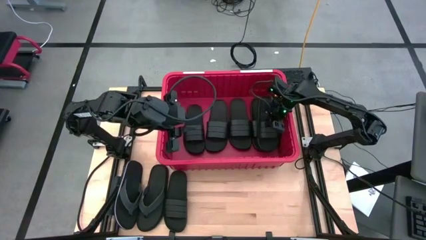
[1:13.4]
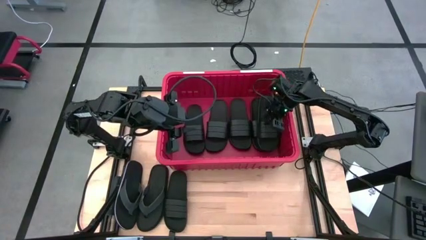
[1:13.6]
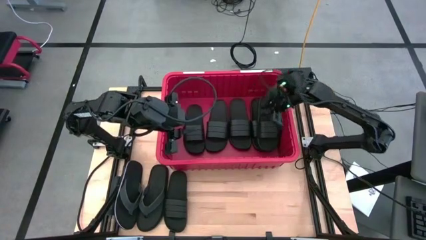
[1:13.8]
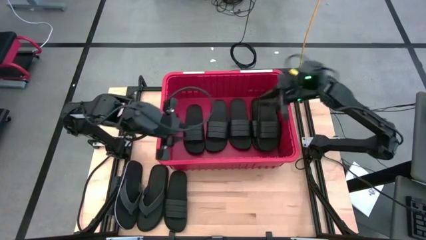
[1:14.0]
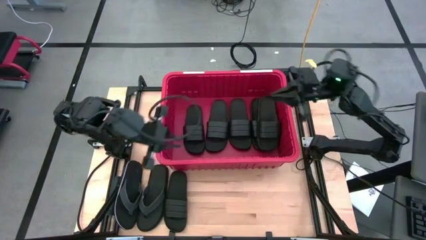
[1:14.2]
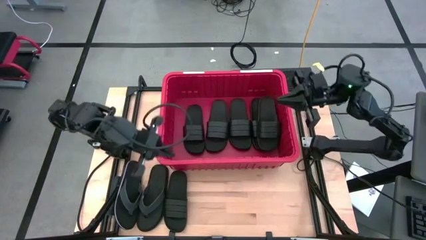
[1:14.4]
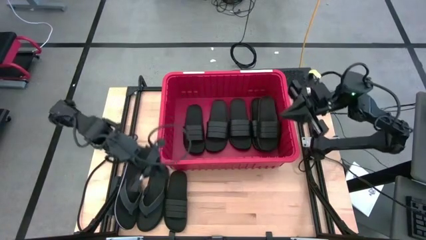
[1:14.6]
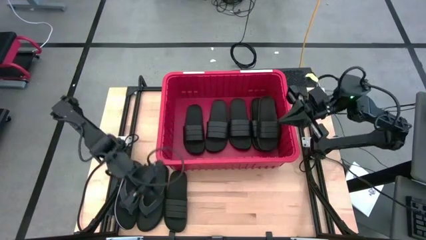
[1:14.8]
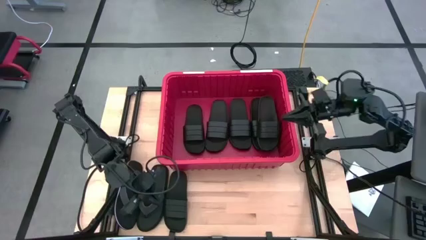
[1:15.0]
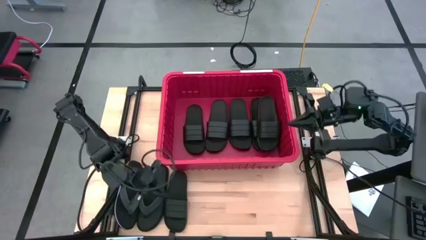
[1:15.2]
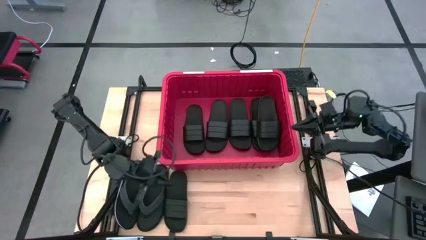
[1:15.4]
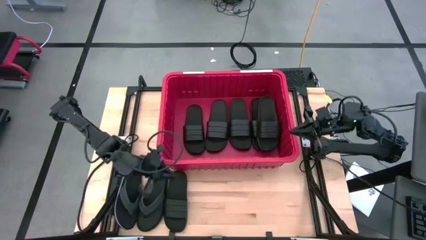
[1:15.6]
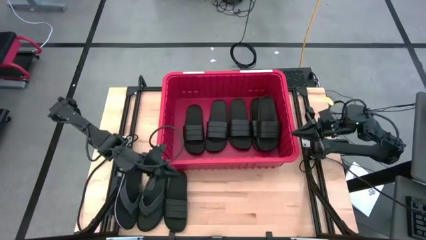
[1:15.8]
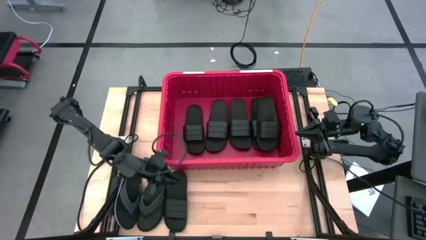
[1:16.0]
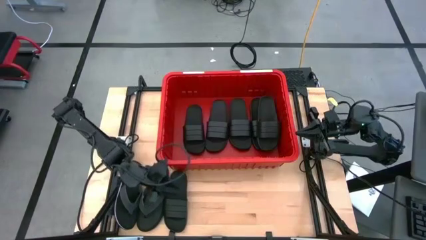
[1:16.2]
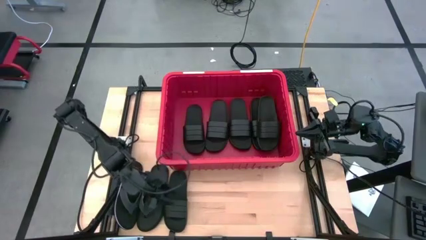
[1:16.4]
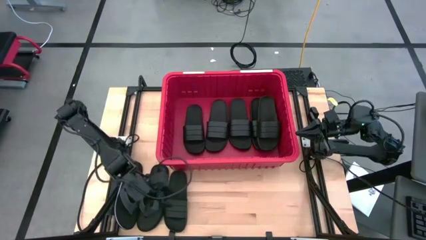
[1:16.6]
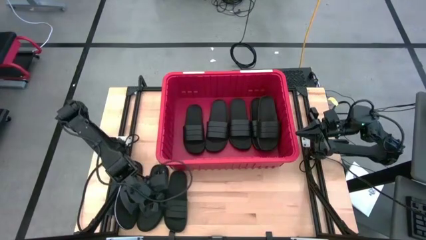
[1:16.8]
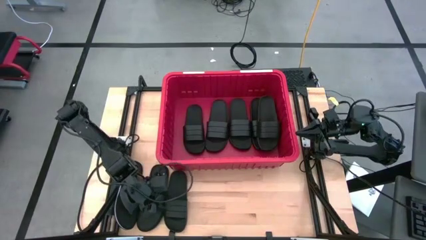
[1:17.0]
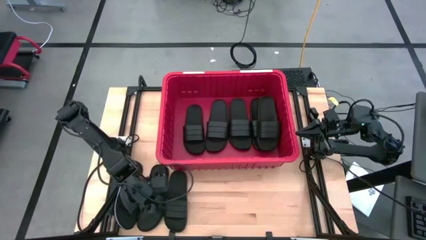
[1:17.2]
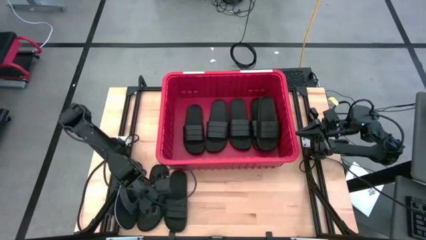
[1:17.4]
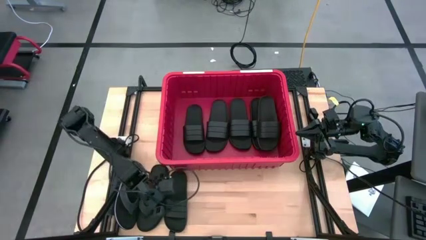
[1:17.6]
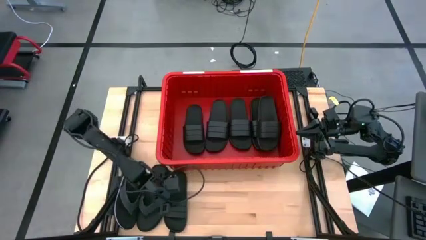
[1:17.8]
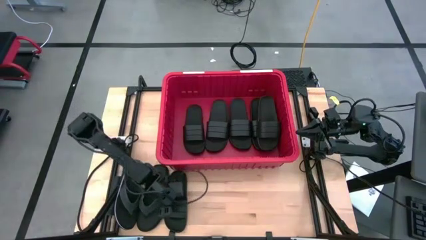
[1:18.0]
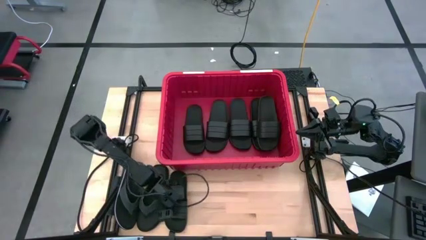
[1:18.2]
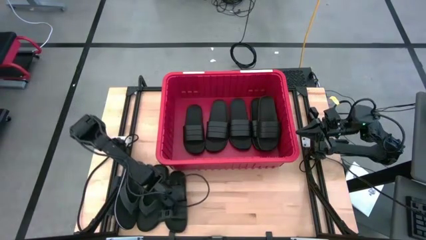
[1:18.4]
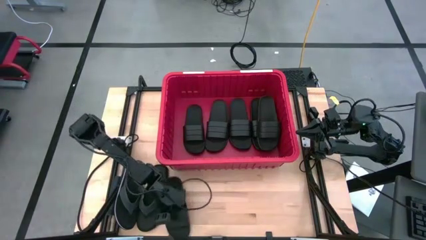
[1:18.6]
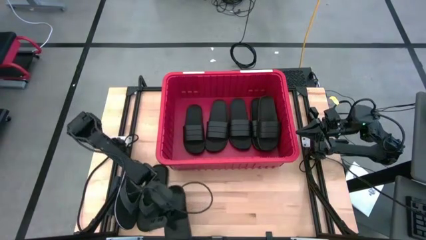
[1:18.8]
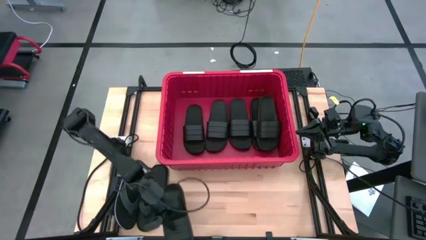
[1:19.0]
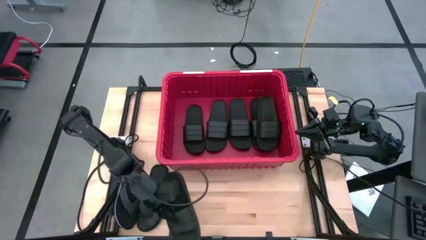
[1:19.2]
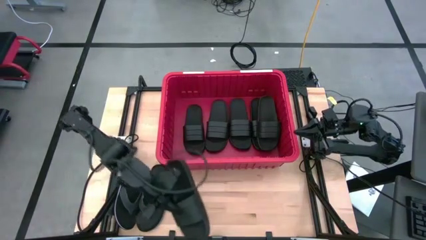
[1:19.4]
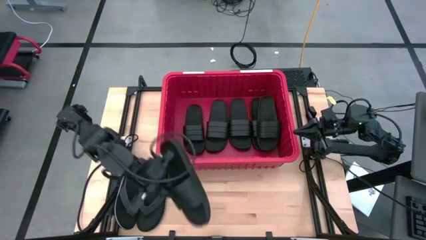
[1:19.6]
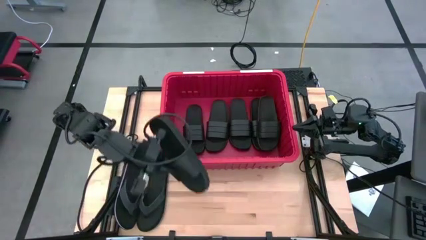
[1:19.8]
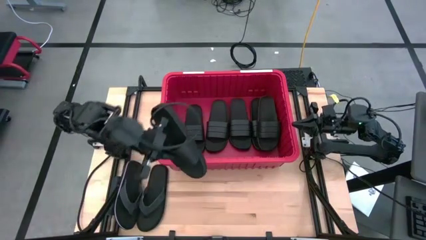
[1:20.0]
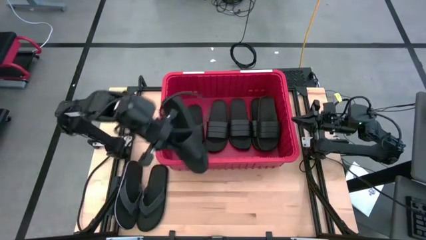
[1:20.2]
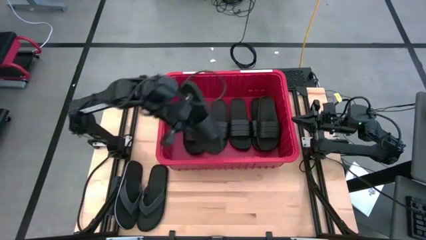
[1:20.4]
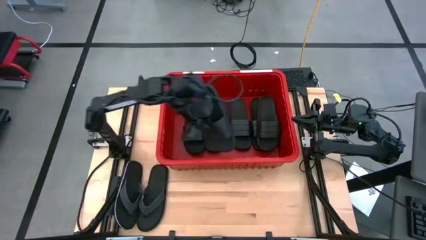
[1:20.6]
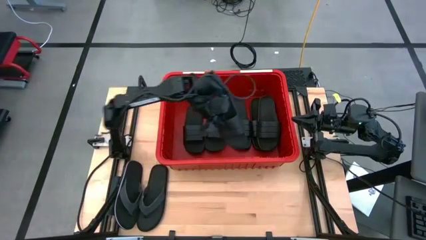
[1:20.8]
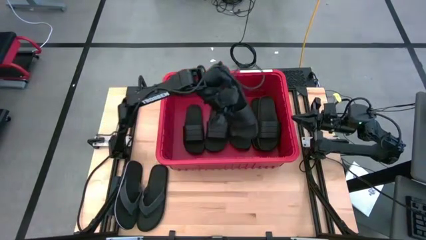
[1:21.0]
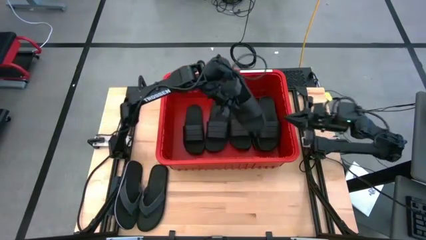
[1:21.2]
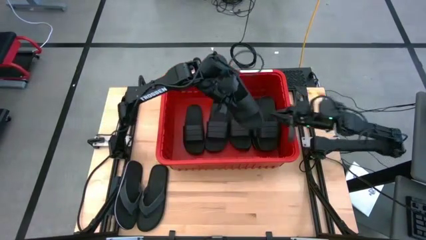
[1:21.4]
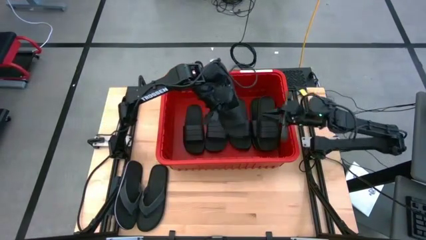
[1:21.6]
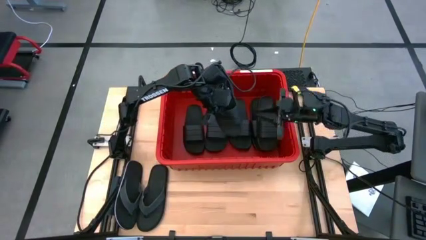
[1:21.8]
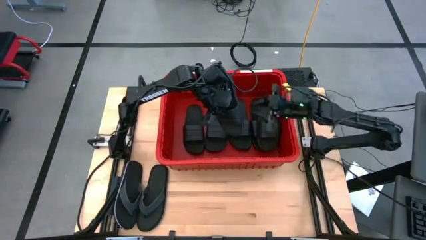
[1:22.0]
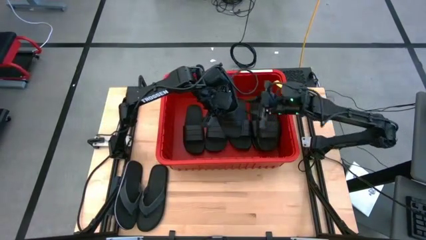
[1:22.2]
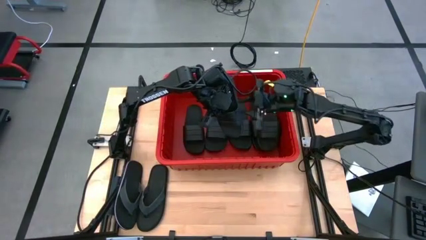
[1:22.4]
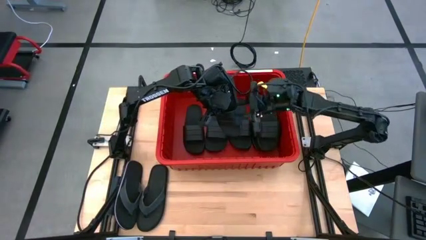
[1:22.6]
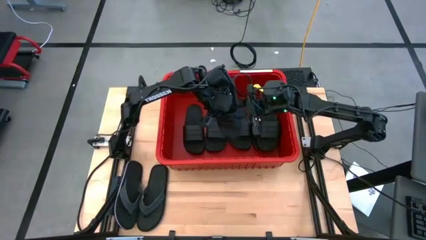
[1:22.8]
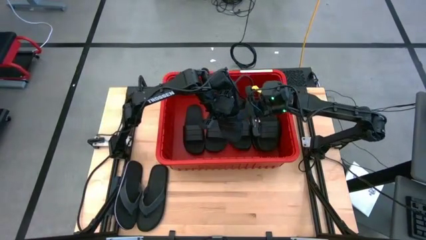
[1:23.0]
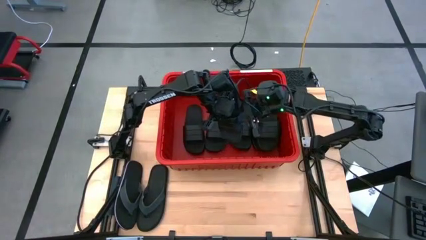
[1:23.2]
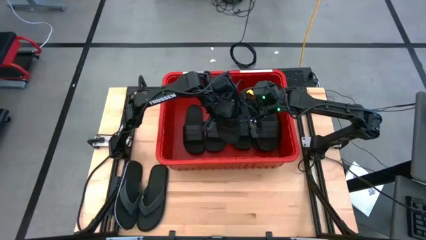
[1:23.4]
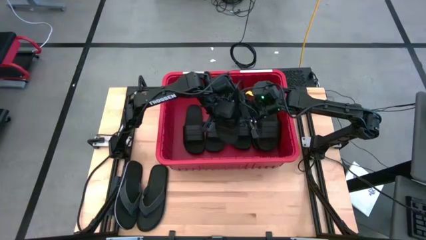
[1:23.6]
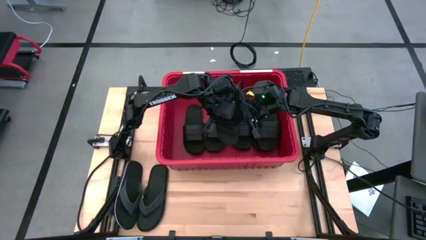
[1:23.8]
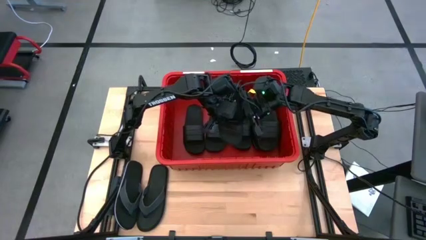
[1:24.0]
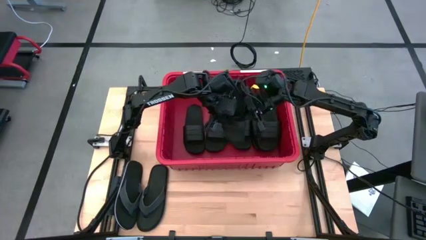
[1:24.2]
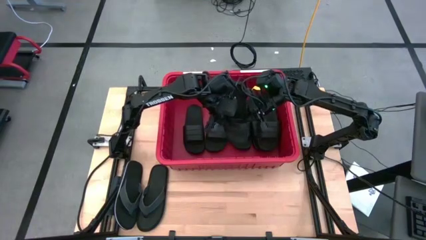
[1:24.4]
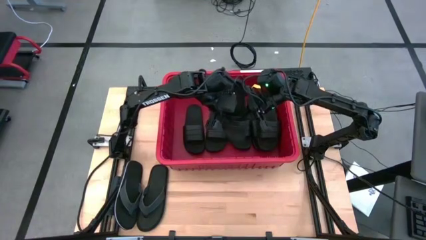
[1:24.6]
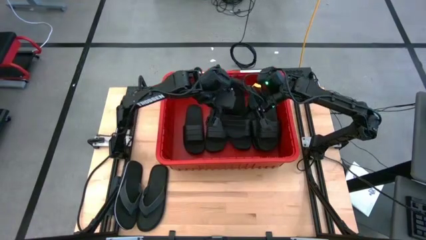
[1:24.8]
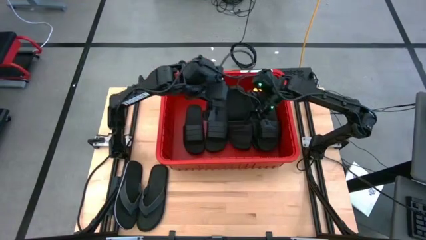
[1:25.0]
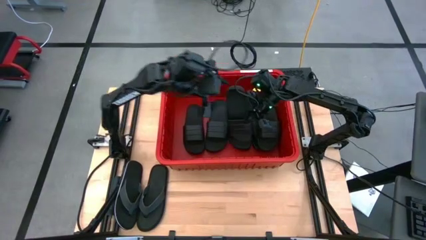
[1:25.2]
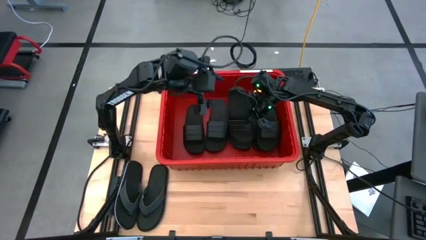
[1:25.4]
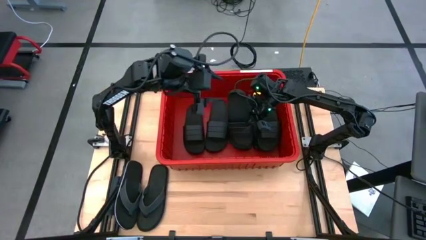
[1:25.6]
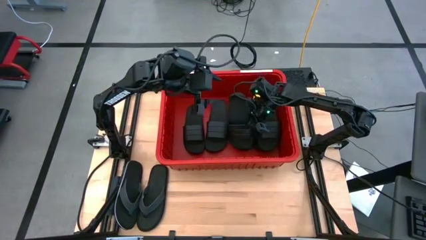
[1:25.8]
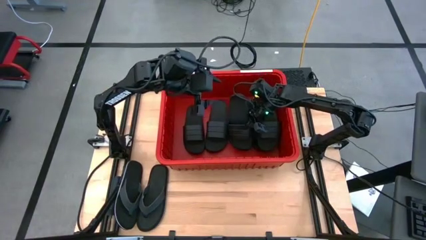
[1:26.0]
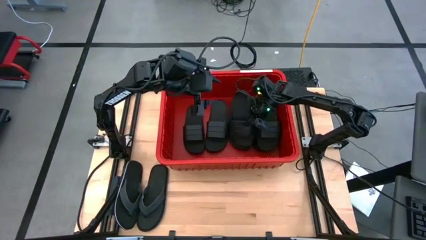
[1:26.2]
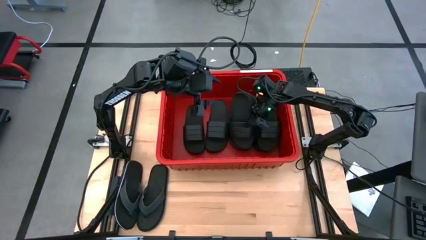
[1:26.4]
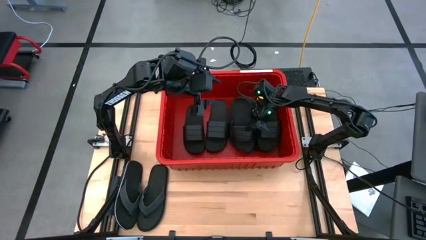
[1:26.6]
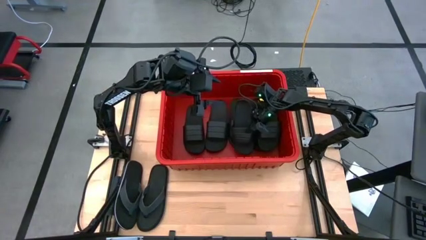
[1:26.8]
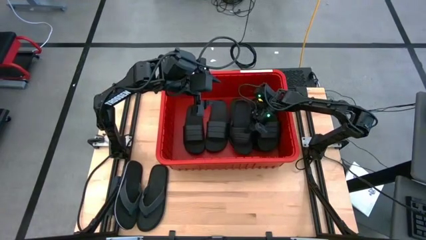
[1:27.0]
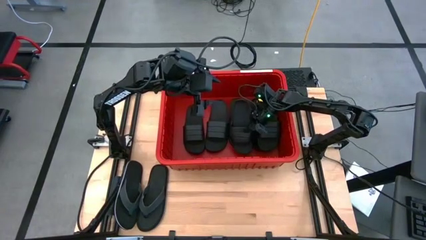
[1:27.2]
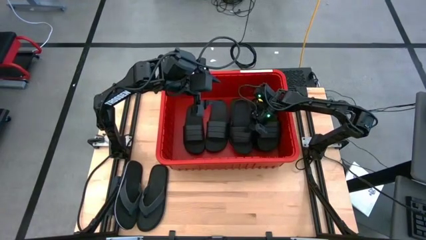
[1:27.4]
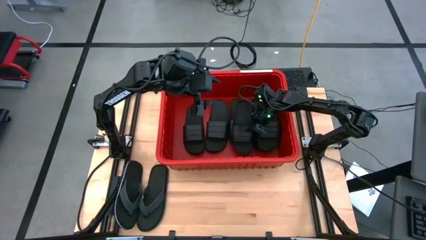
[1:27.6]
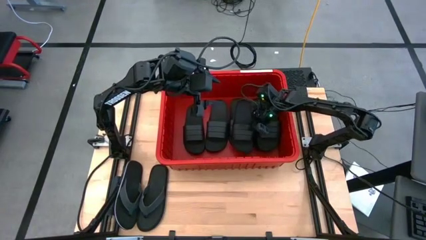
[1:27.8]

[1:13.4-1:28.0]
Task: Pick and place slides into bin
Put the black slide into the red bin

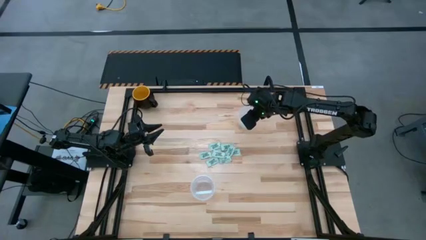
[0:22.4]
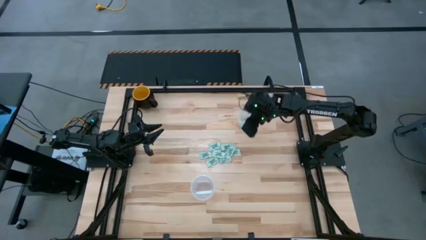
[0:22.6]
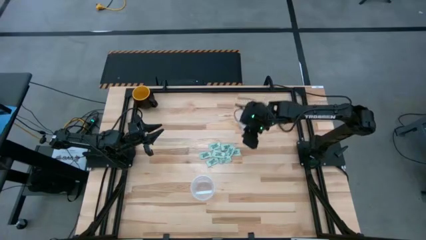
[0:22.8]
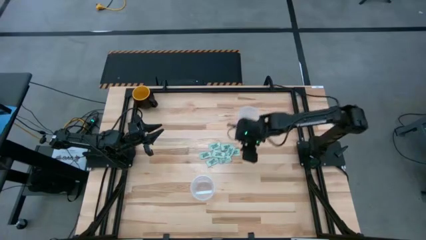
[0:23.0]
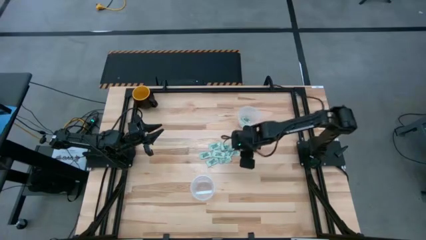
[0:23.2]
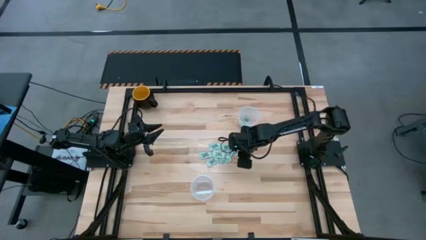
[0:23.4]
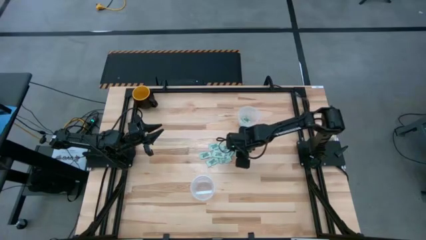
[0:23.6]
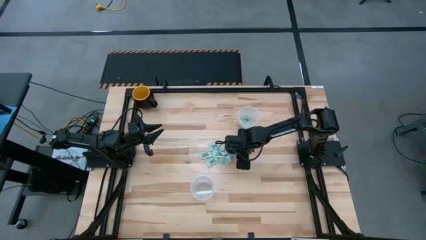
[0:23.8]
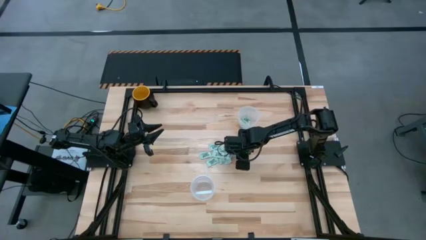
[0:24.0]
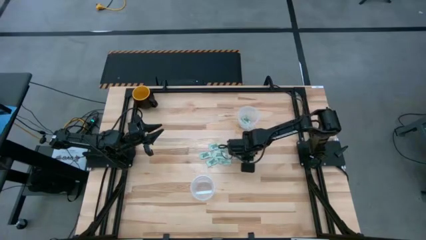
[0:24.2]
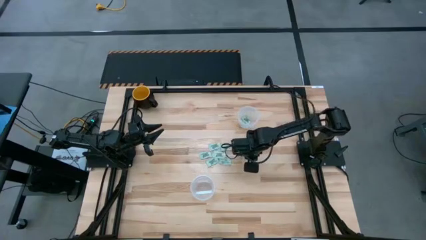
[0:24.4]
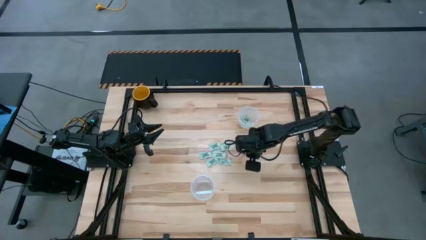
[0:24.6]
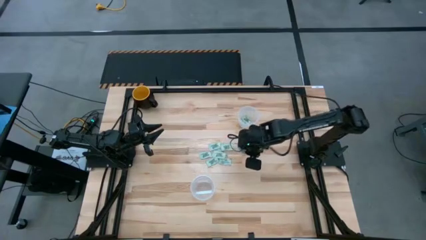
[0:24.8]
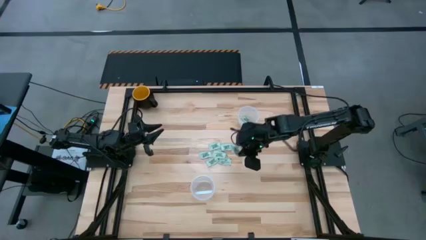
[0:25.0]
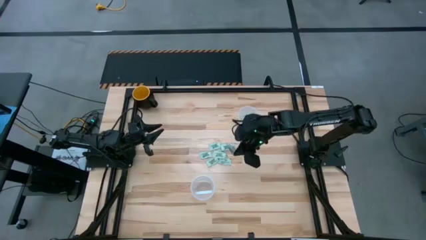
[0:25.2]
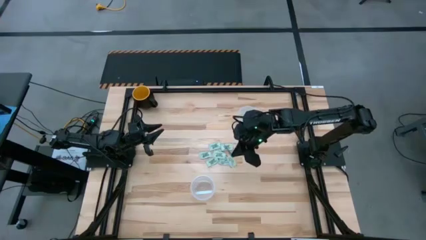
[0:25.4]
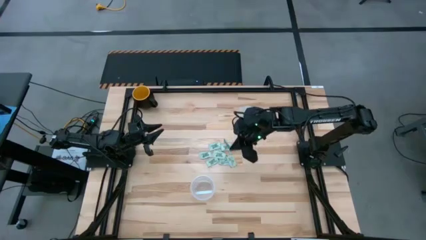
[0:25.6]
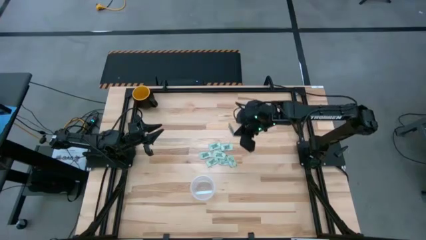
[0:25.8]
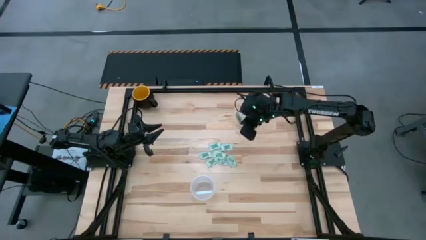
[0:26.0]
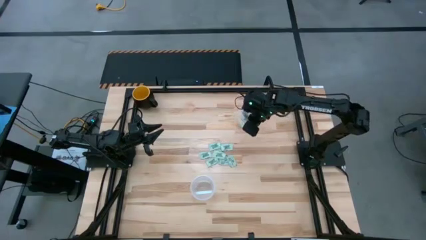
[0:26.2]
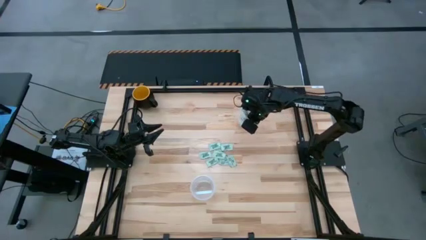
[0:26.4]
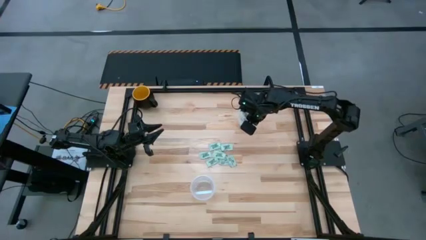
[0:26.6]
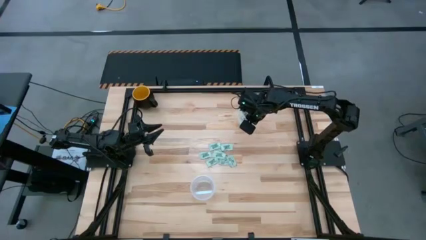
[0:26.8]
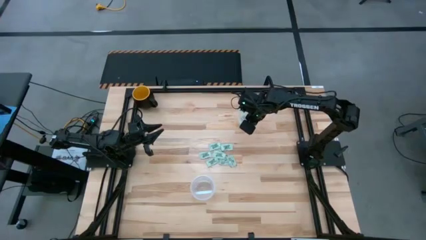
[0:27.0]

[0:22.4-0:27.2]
Task: Pick and place Stevia / Truvia into bins
Put the stevia packet into the top transparent container
